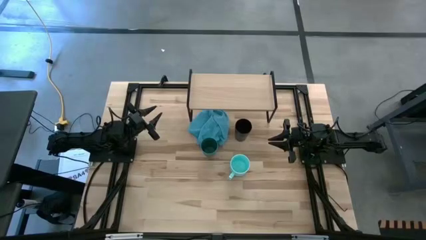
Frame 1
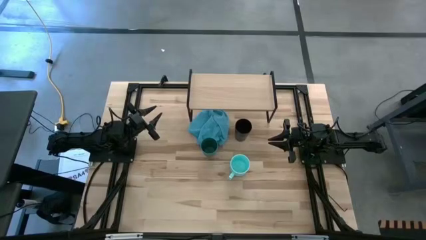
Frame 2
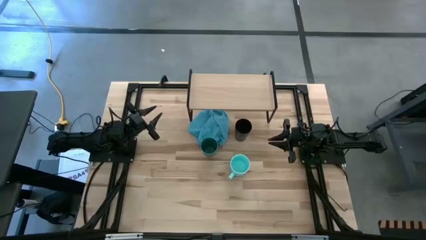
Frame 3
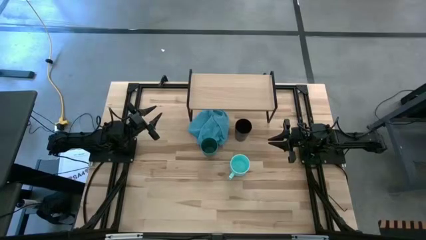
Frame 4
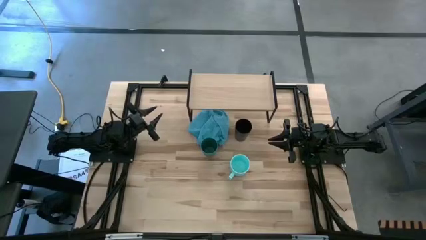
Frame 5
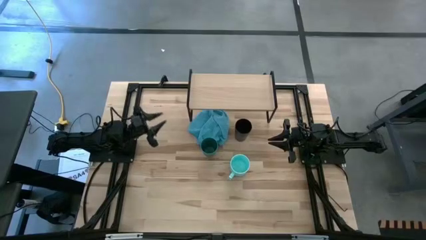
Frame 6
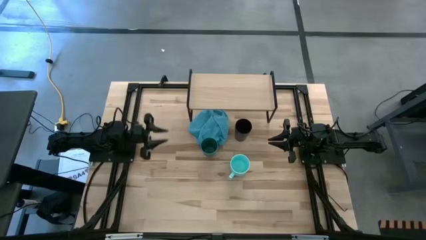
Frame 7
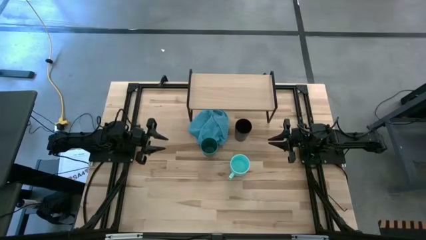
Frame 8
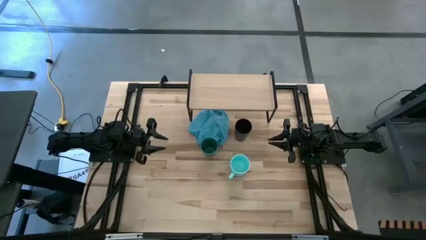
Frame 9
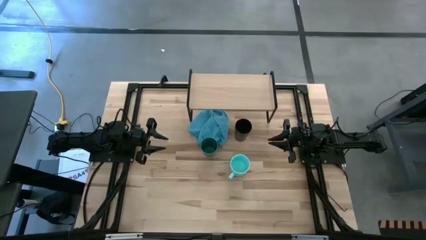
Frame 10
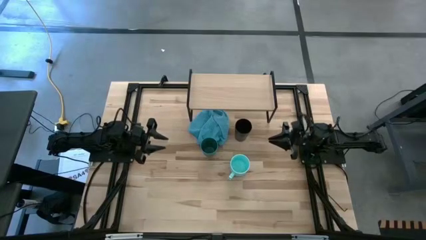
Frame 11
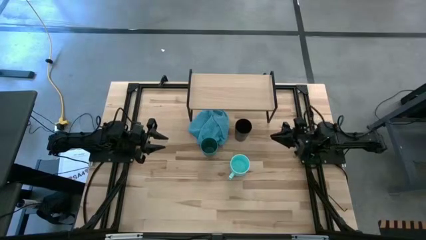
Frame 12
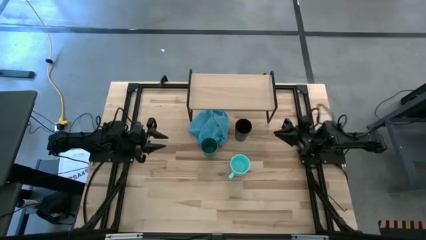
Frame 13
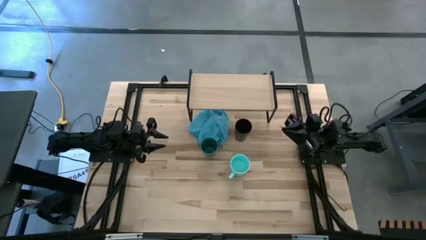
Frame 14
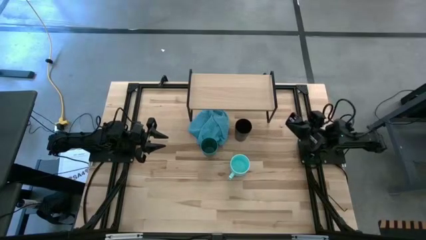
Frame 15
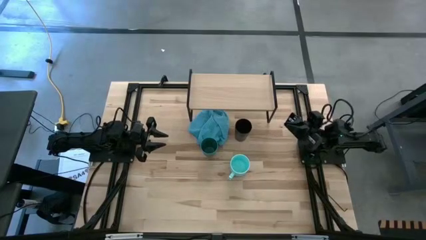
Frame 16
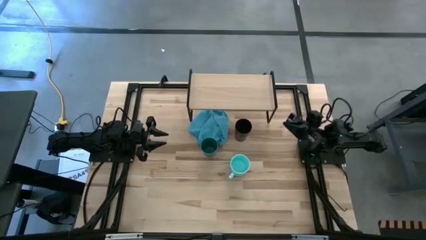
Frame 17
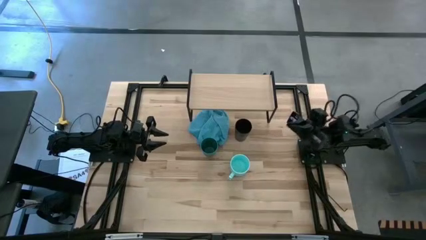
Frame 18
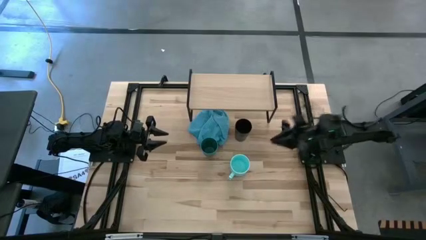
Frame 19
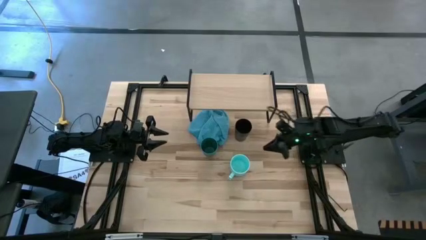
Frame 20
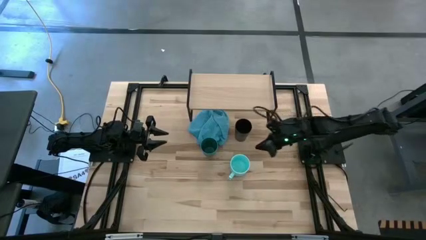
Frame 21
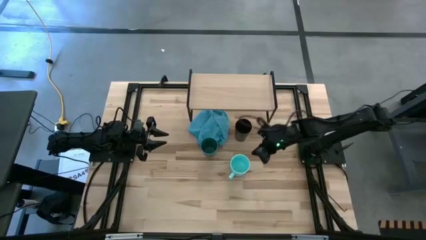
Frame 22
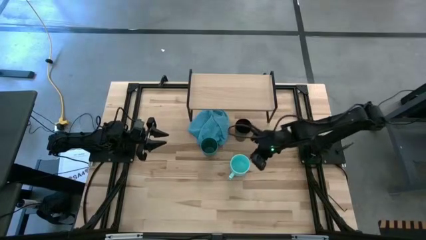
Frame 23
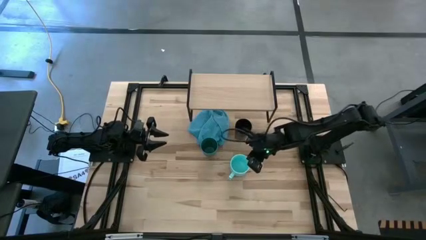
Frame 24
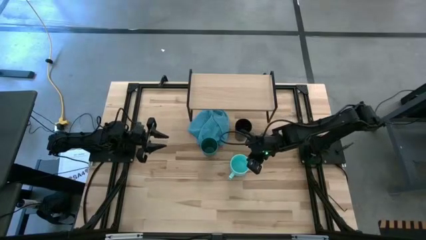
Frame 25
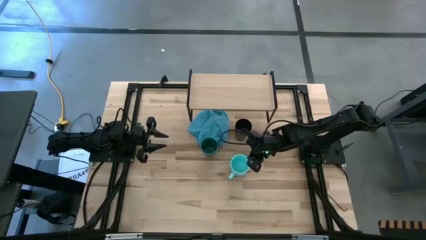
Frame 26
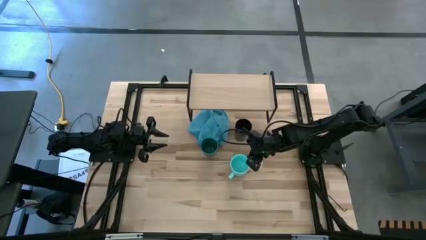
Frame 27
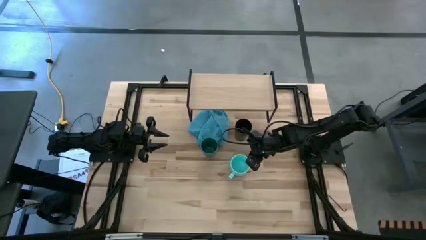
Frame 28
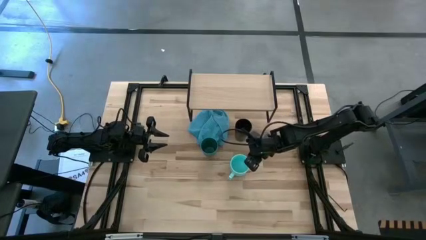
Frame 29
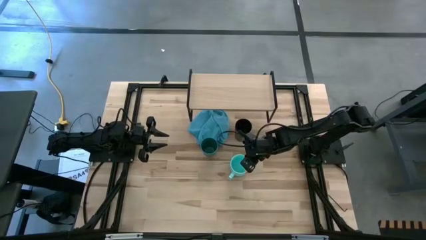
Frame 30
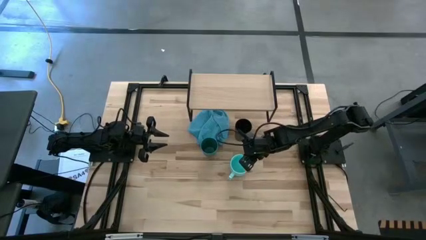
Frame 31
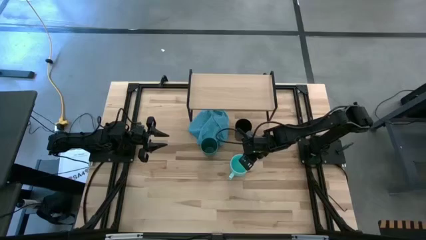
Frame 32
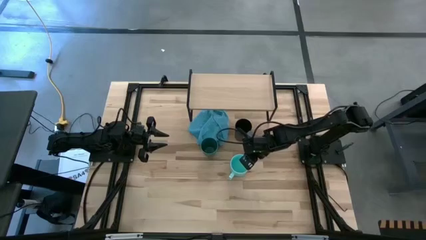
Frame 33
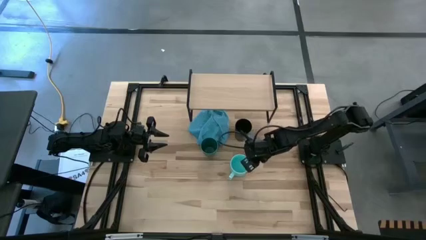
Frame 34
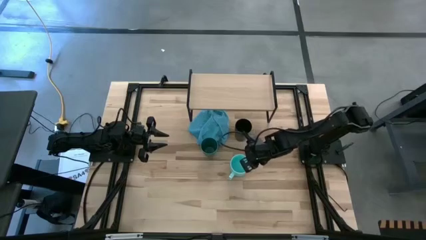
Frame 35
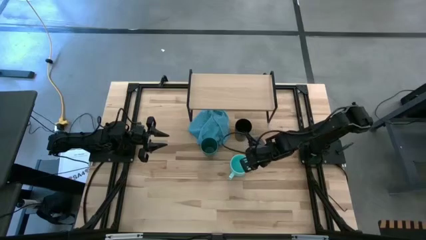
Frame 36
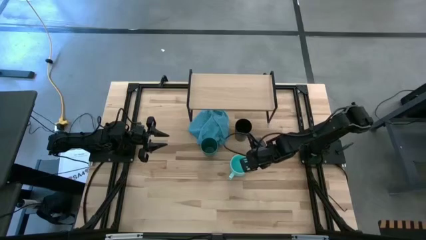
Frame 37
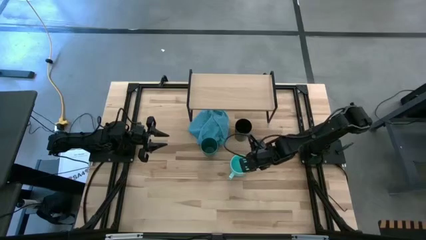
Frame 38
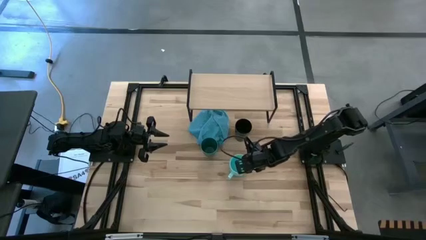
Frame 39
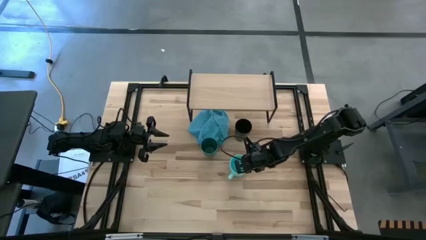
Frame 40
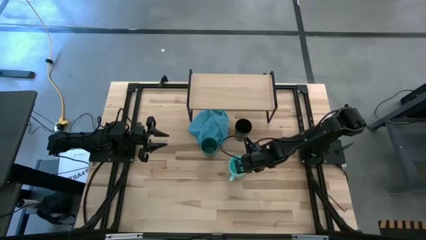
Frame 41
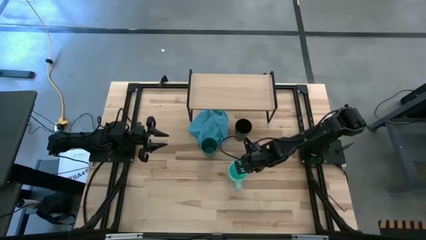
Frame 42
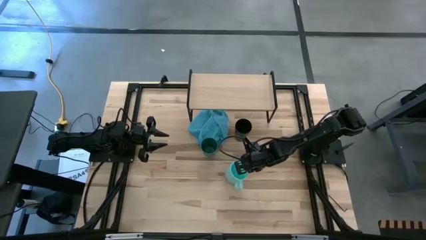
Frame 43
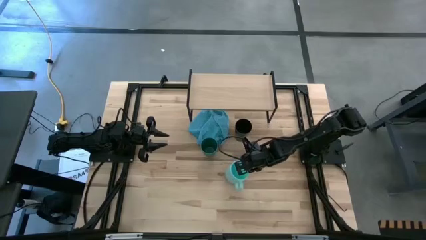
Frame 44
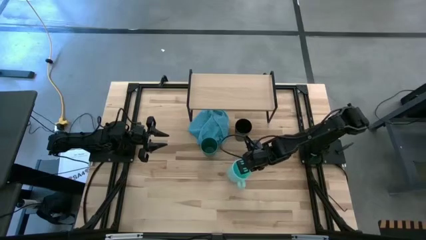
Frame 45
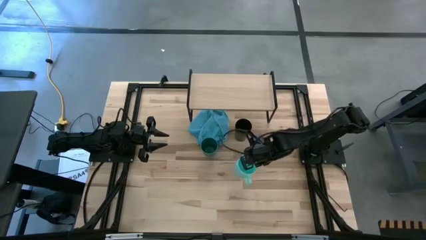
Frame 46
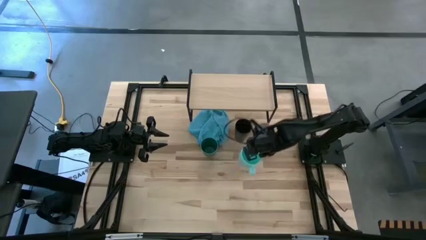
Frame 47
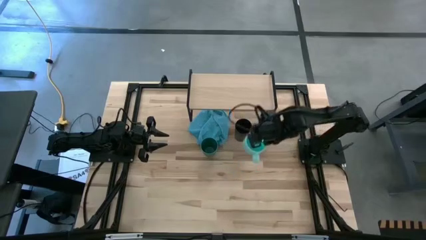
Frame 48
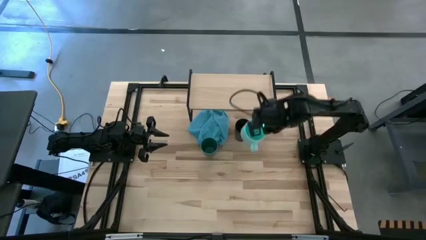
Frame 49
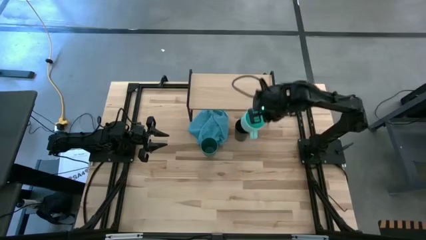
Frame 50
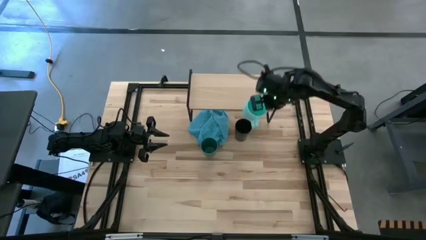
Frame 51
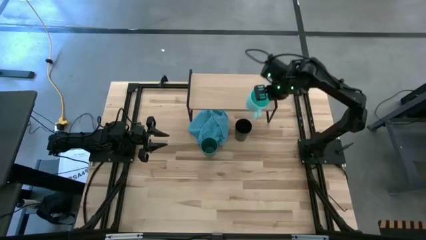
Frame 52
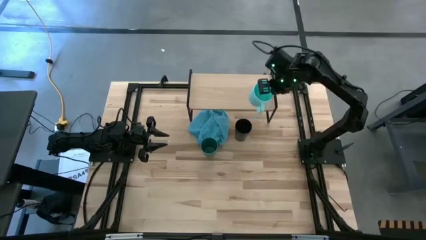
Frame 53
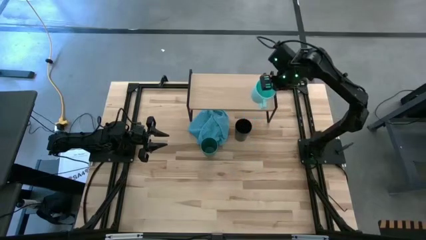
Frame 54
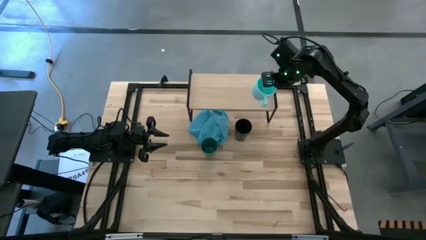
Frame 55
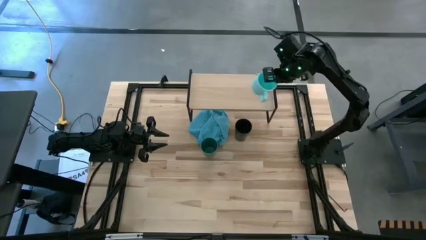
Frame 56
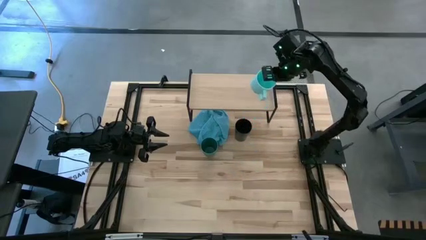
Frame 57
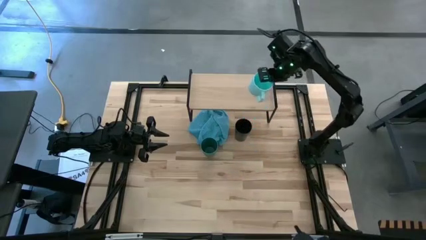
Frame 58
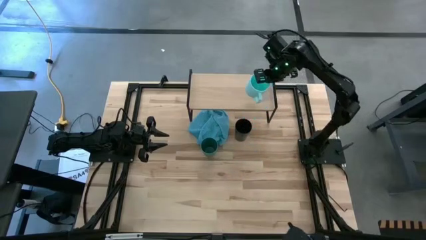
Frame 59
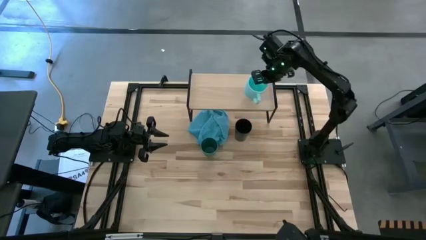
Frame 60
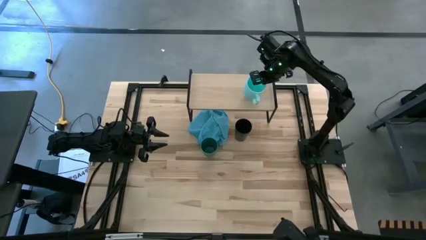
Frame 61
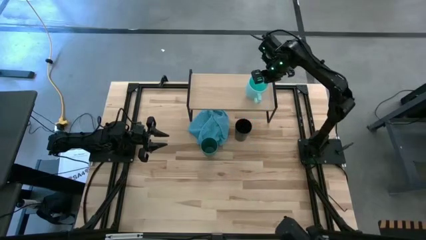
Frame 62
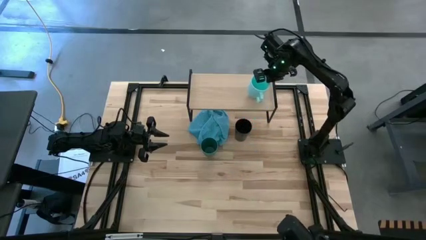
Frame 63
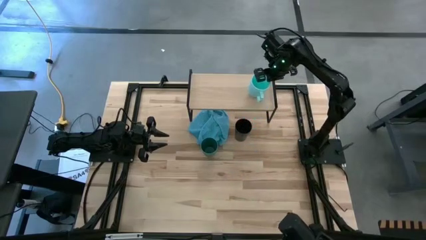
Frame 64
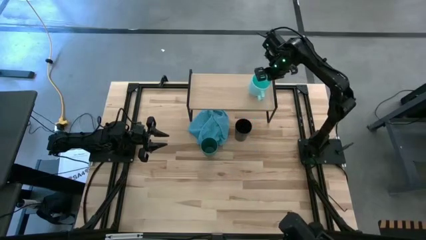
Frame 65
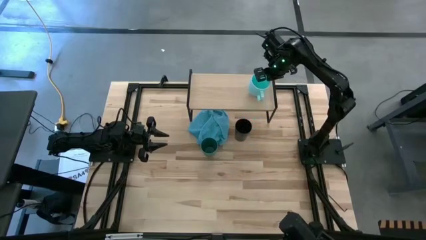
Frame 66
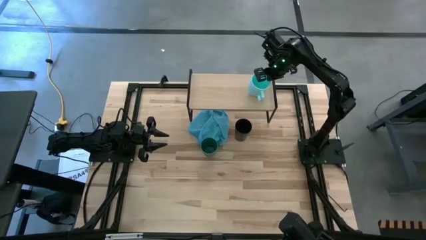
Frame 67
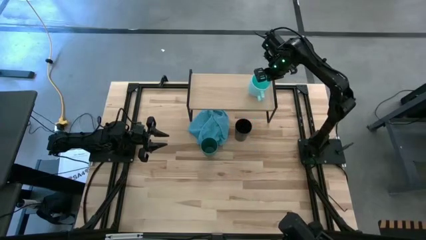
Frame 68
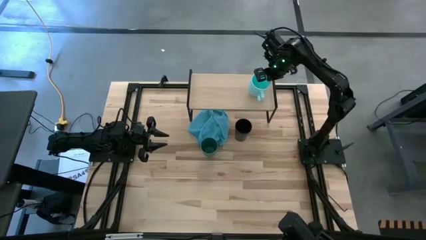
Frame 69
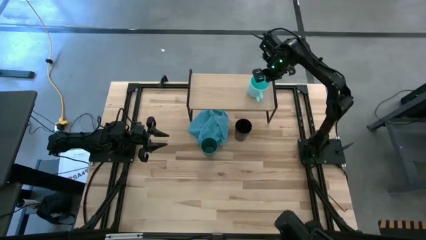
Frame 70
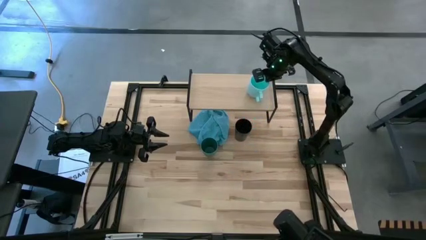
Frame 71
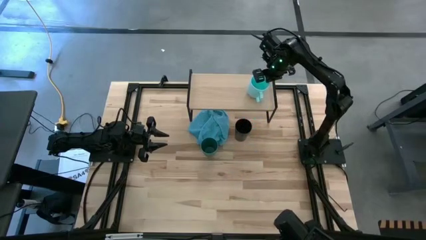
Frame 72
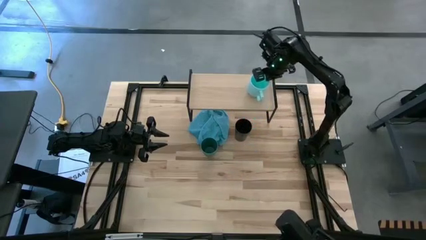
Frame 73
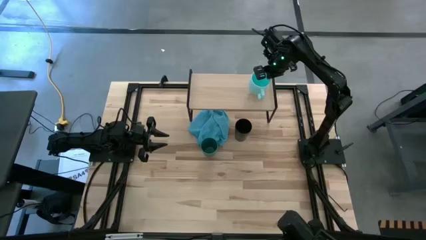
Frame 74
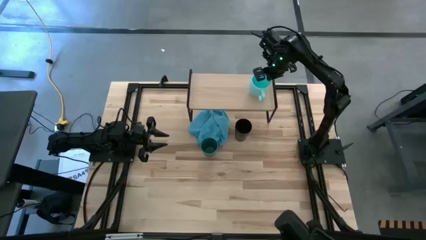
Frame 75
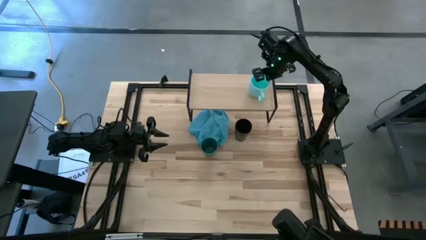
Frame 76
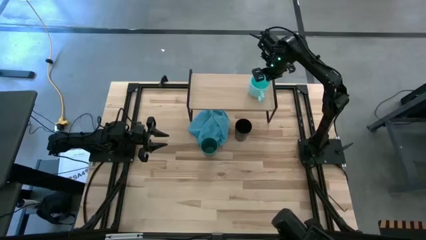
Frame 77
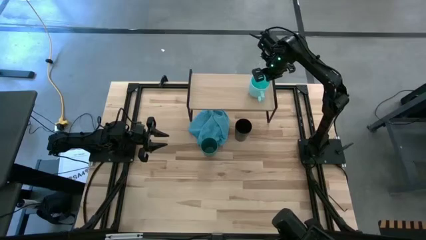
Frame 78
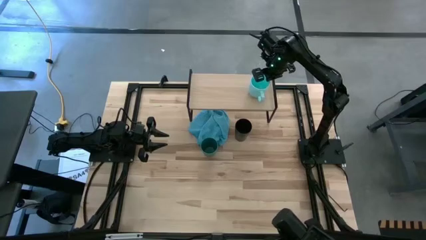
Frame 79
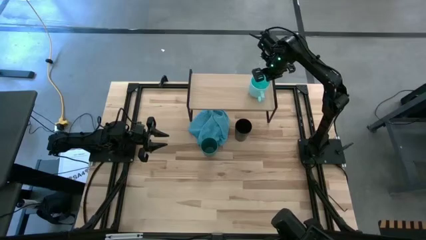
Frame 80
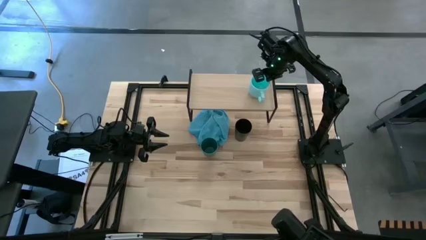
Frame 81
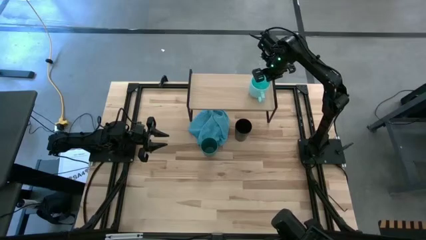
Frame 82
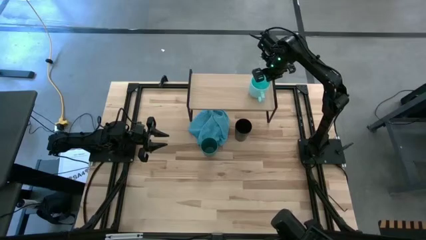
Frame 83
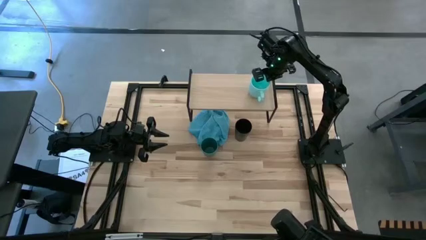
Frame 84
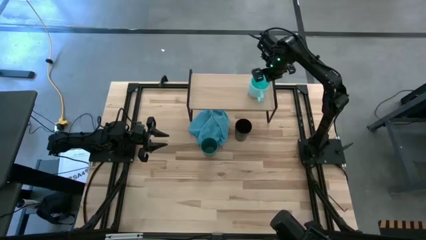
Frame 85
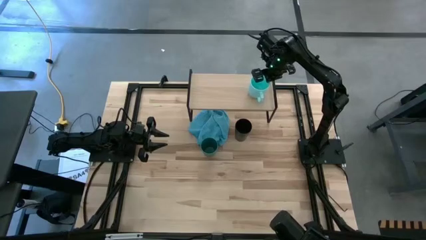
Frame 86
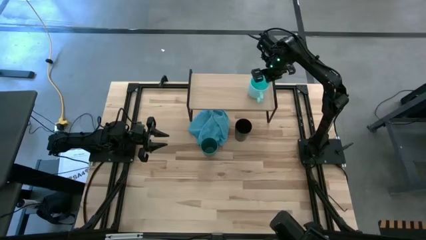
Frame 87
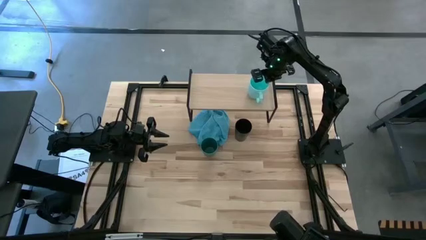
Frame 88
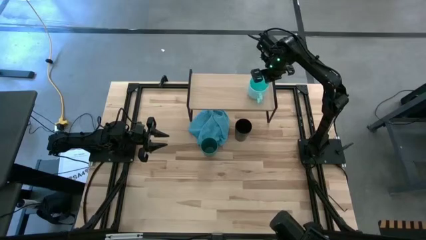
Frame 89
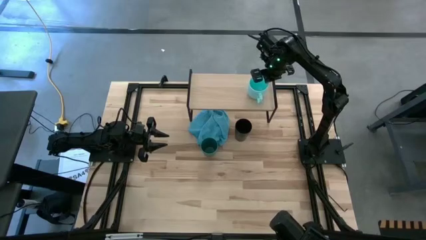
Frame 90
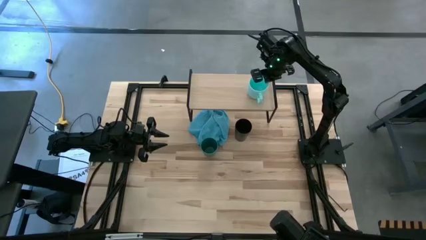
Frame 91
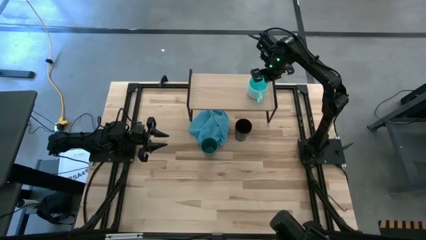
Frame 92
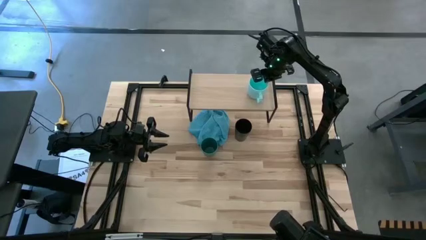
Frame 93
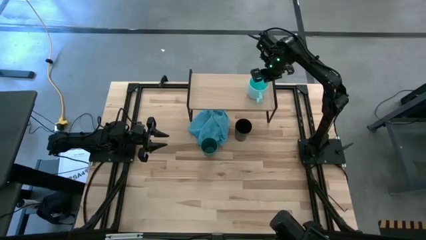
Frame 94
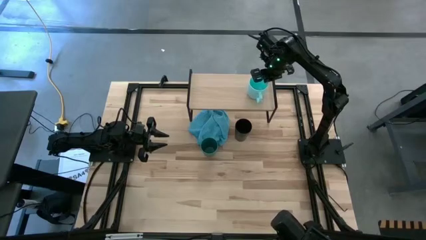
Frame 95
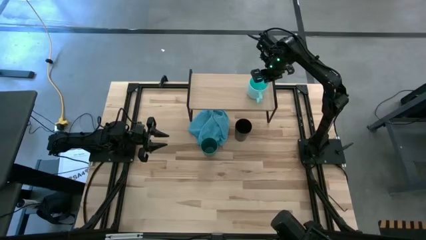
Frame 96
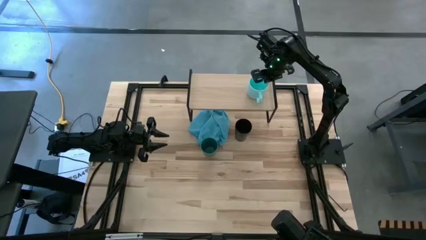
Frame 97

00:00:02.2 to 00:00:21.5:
Task: Stack small to large cups/mugs on shelf
Put the blue cup on the shelf
